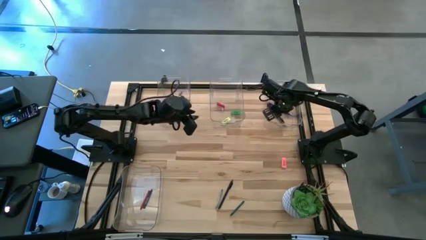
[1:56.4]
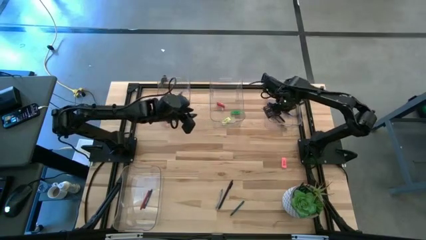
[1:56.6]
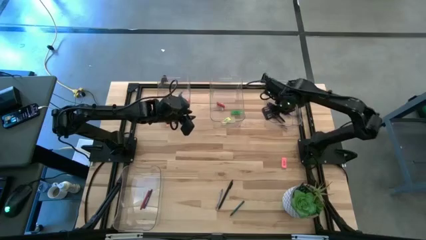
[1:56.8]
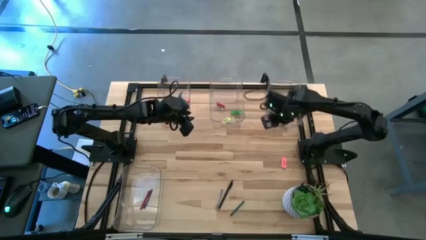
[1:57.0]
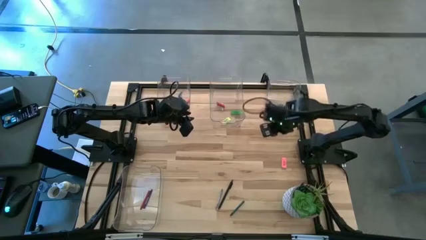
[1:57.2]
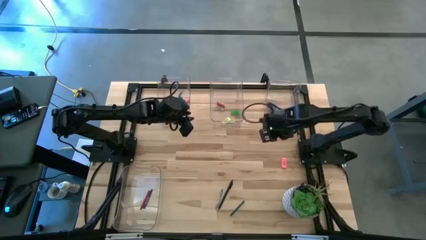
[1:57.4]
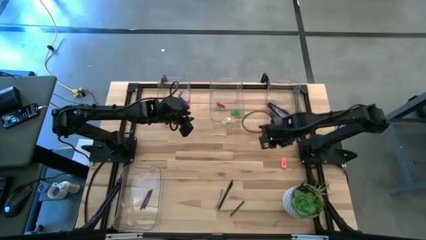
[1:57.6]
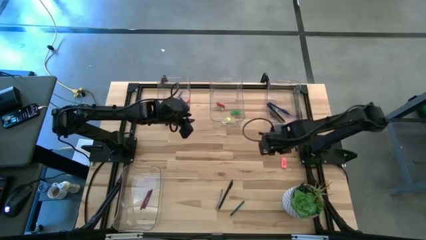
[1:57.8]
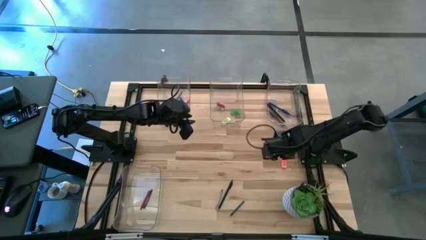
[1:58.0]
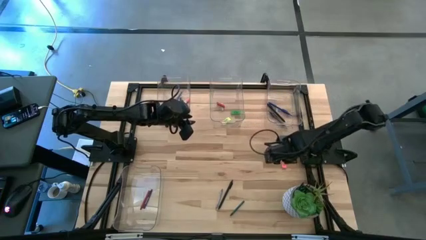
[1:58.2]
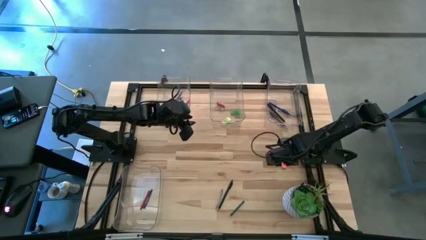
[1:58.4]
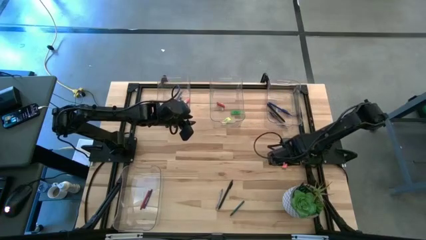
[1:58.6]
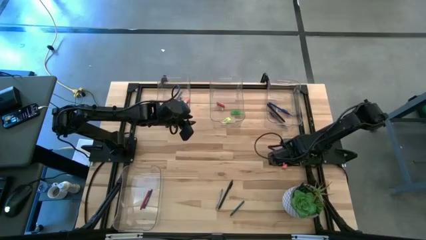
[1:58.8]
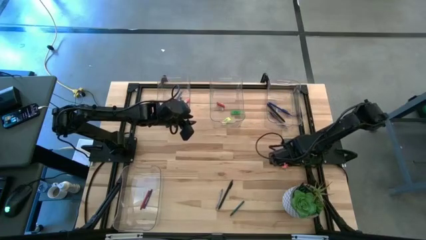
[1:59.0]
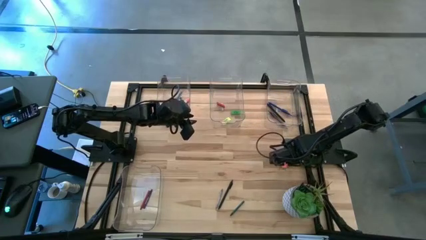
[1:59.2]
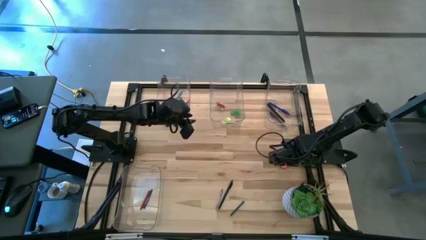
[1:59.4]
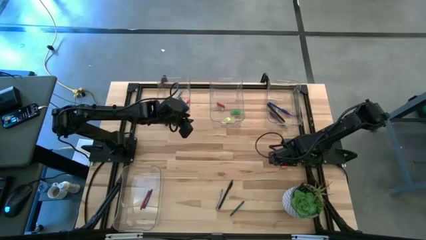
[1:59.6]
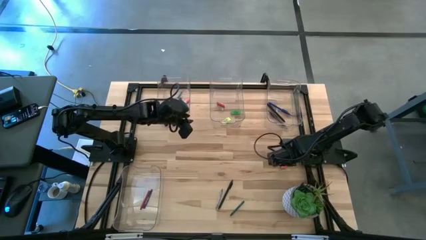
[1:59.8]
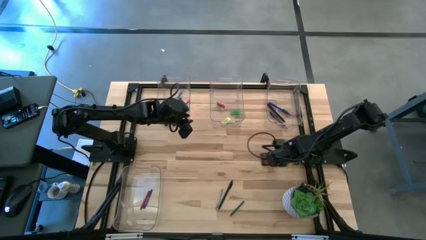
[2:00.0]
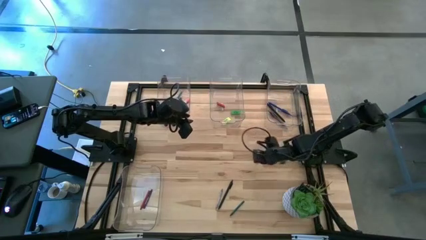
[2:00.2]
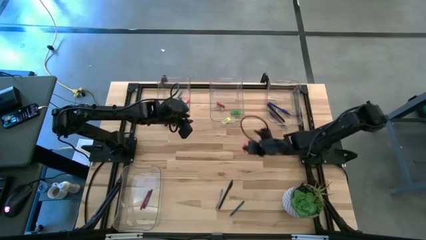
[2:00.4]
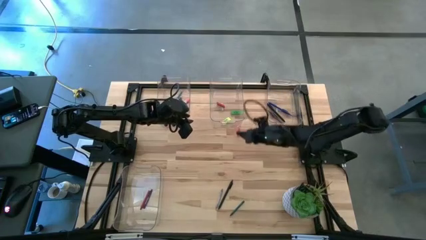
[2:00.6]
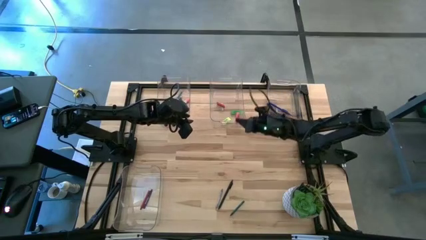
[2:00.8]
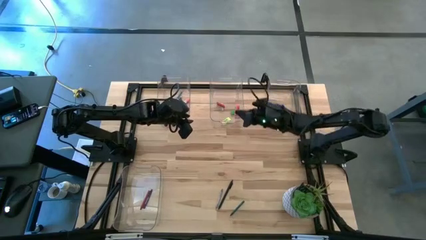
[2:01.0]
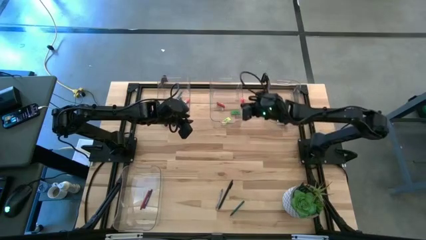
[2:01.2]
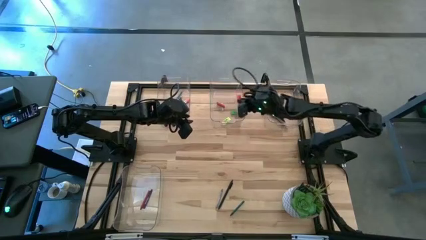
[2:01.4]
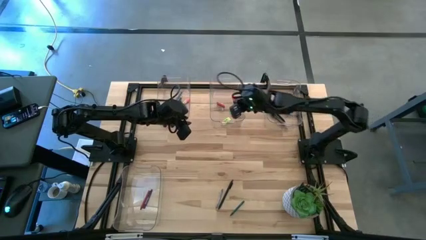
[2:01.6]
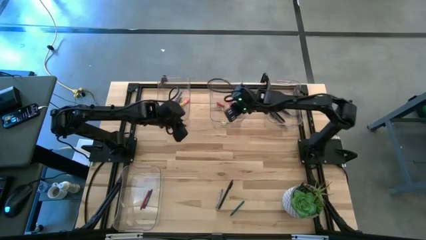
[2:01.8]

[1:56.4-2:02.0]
Task: Sort crayons/erasers/pens/pencils in bins
Put the pink eraser into the top middle transparent bin

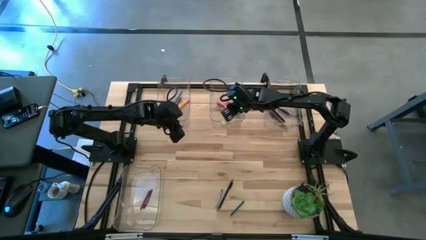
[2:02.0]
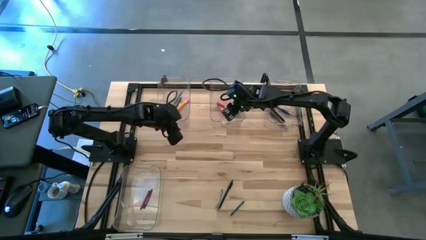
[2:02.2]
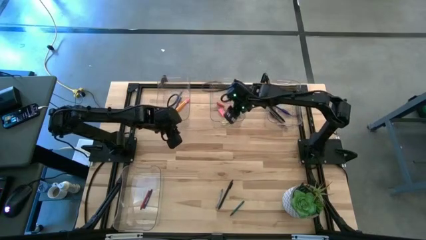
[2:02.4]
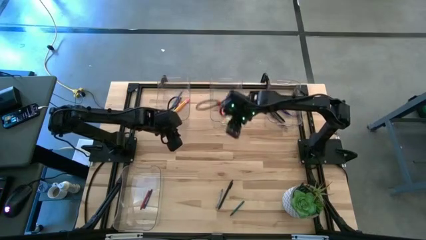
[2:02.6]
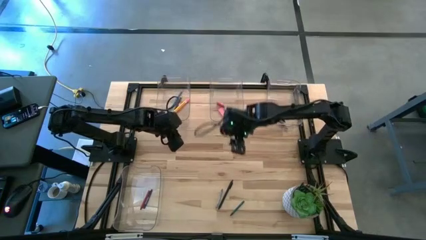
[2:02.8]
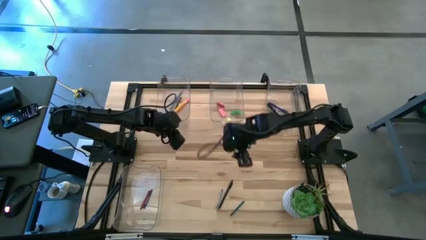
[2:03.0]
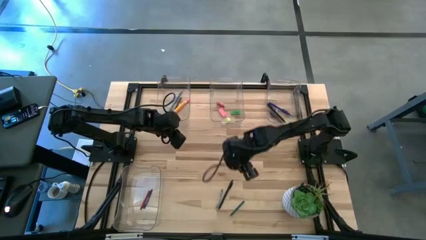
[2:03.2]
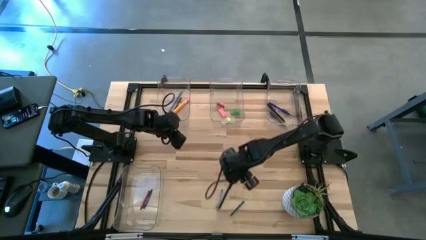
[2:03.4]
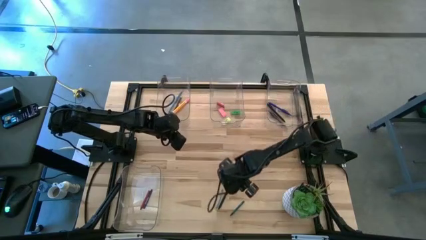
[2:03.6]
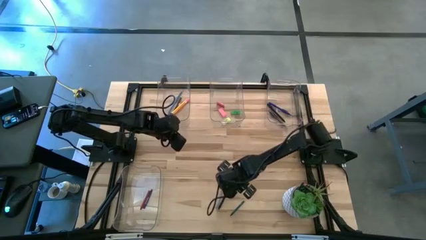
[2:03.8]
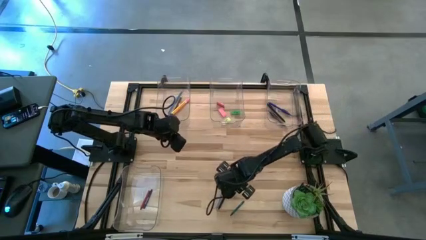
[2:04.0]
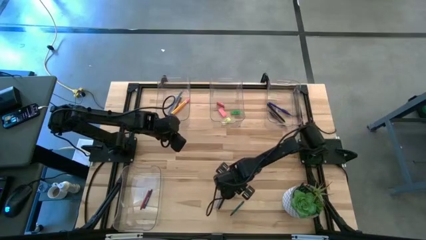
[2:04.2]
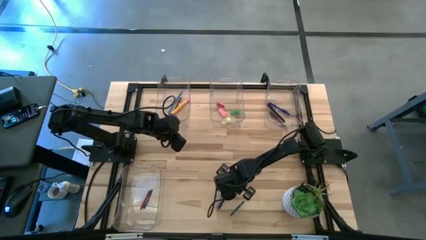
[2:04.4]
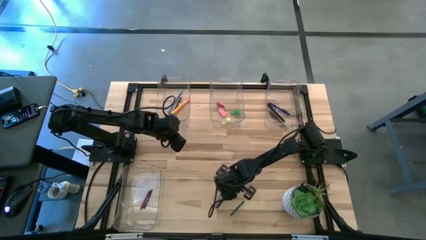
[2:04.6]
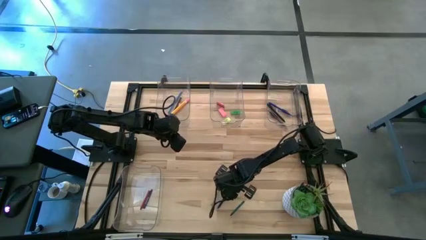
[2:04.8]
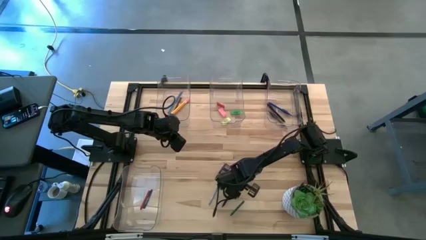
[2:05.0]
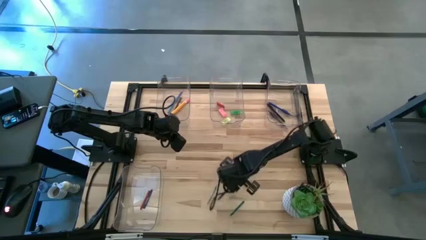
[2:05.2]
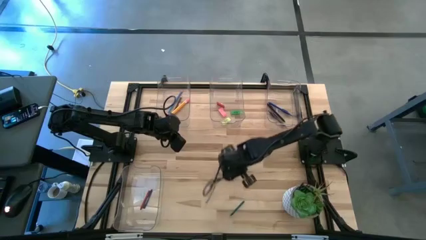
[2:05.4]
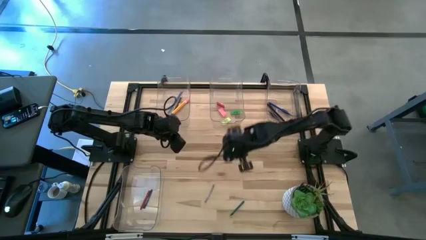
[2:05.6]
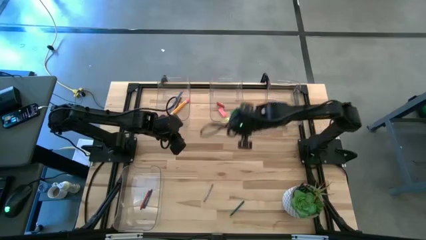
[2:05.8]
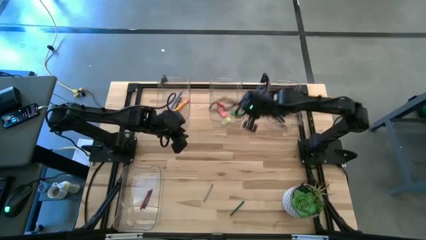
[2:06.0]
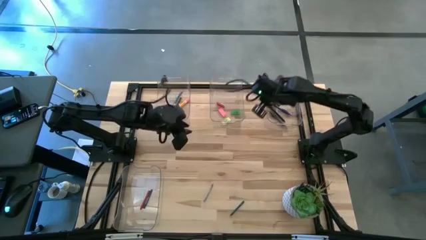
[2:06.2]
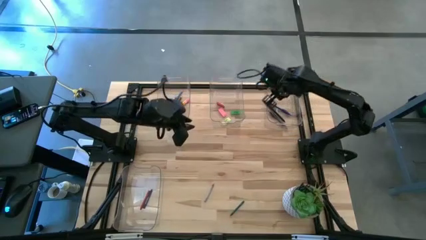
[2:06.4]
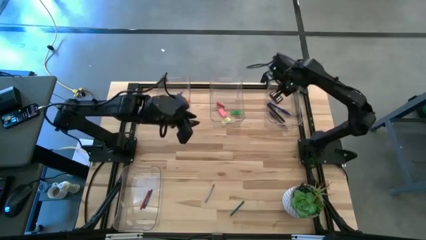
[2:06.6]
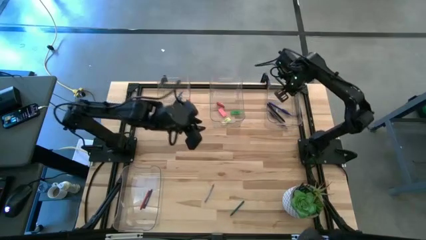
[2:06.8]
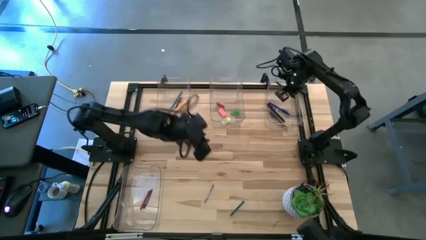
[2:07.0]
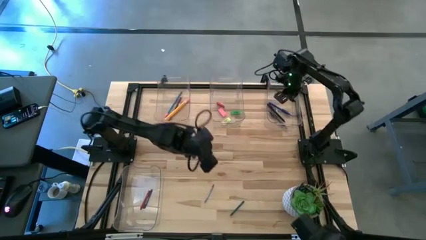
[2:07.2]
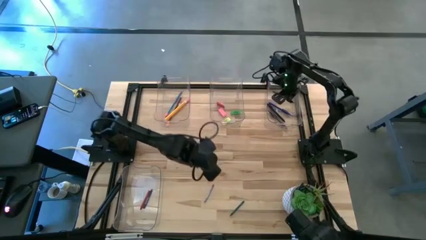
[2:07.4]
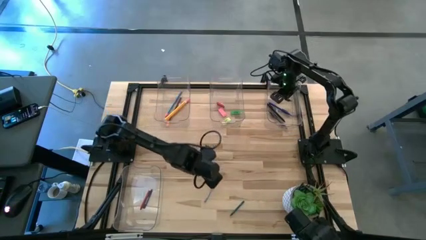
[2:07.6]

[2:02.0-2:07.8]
Put the black pen into the top right transparent bin

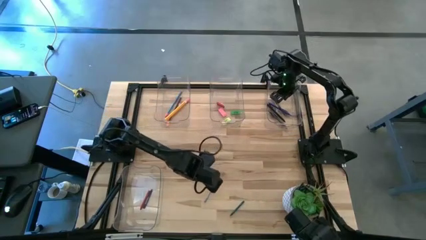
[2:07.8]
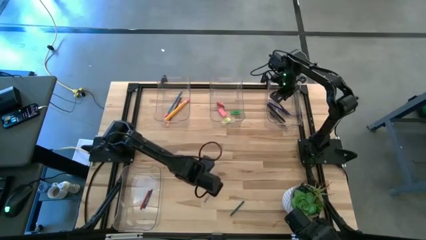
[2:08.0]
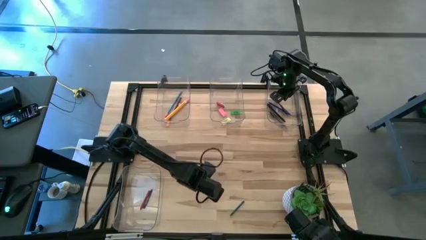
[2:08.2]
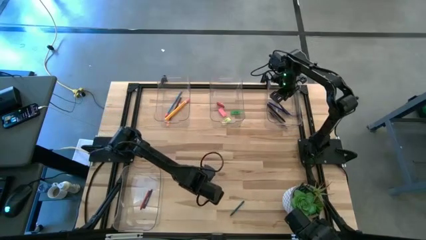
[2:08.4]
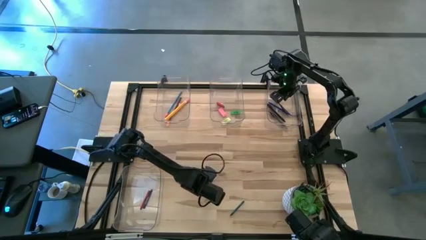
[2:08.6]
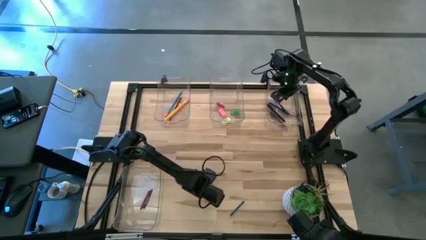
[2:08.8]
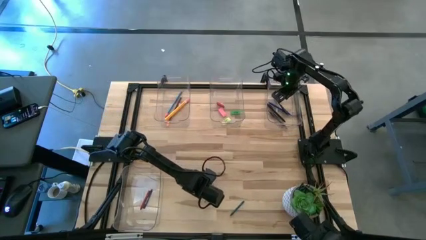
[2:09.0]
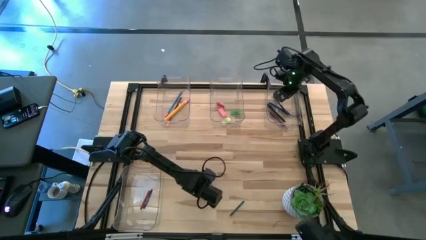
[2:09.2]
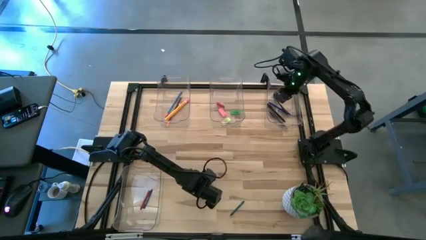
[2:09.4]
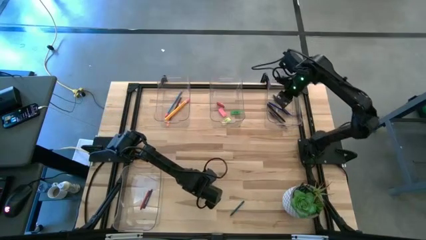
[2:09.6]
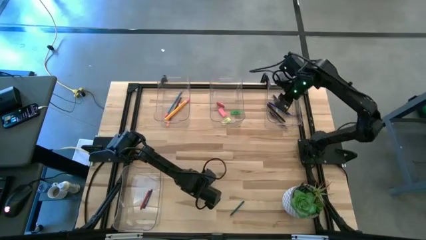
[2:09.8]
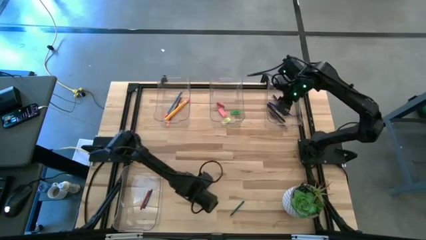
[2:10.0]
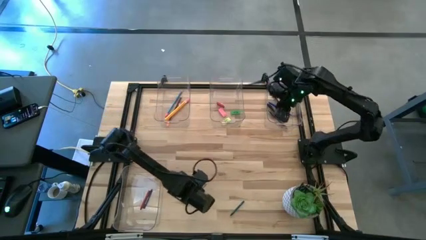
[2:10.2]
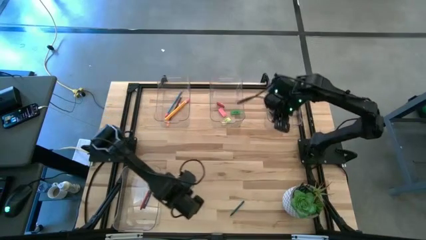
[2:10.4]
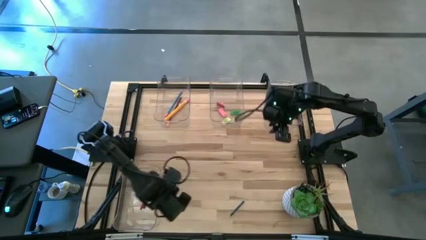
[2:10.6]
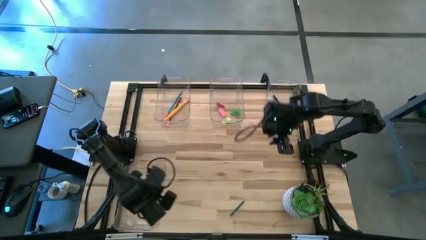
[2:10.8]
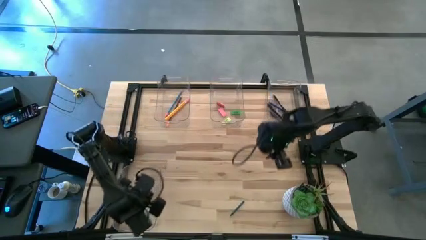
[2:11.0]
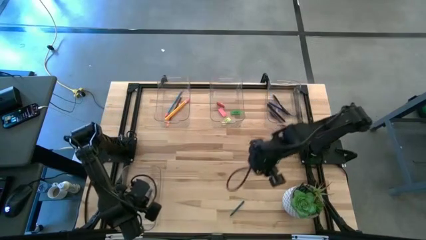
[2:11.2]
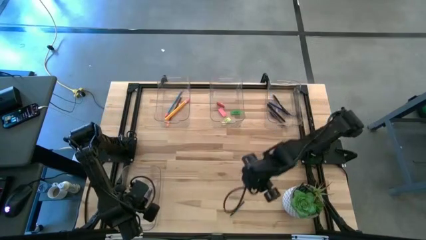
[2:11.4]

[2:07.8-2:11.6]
Put the gray crayon into the bottom transparent bin
